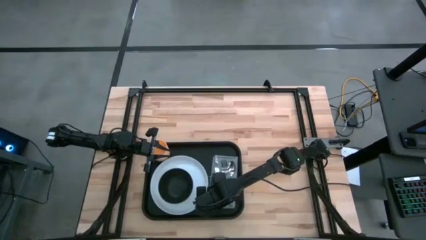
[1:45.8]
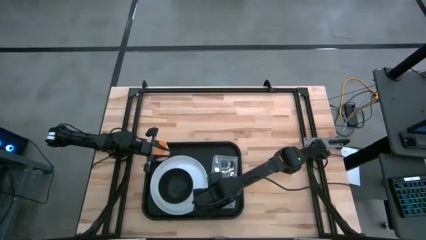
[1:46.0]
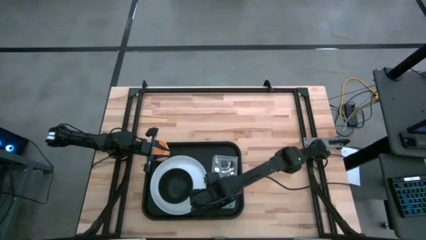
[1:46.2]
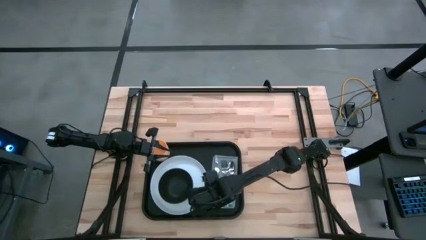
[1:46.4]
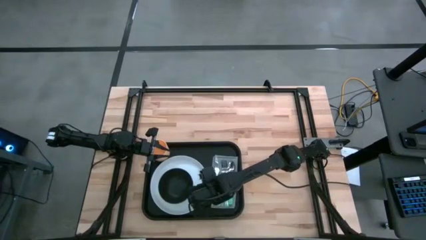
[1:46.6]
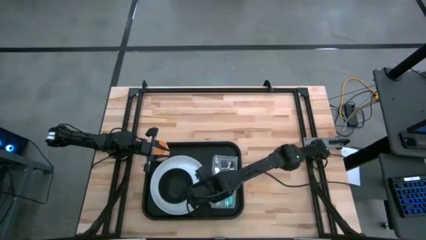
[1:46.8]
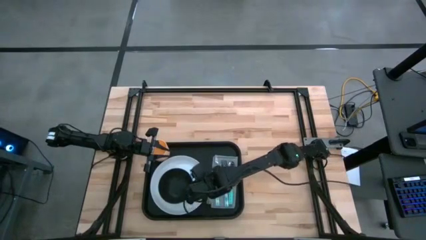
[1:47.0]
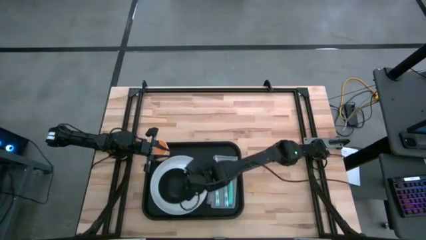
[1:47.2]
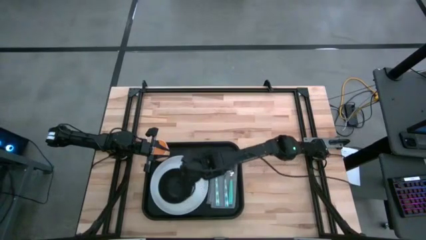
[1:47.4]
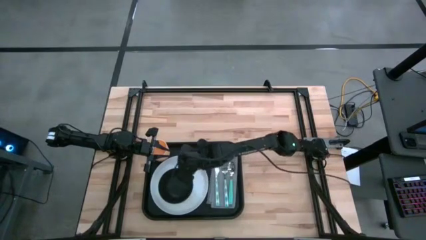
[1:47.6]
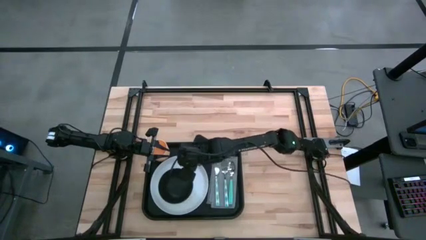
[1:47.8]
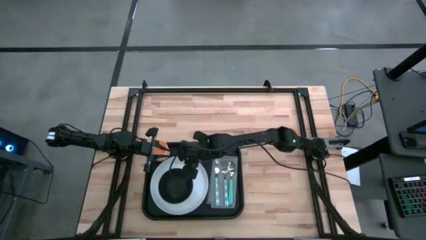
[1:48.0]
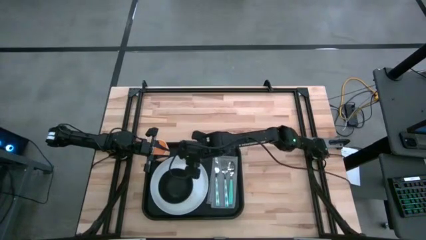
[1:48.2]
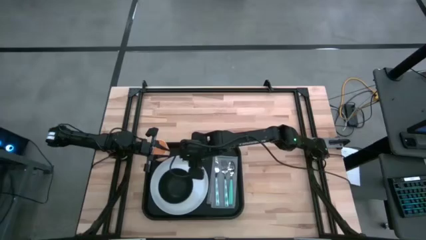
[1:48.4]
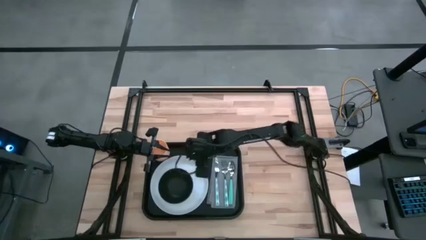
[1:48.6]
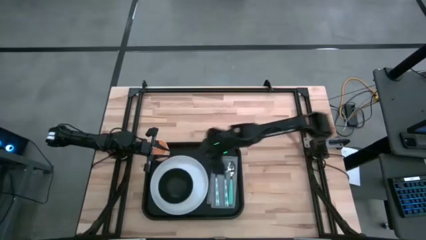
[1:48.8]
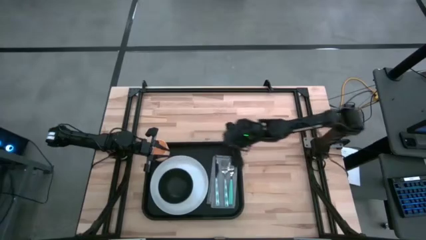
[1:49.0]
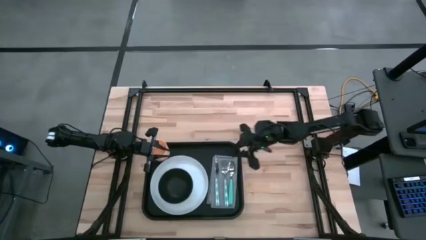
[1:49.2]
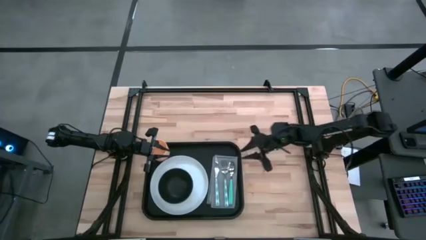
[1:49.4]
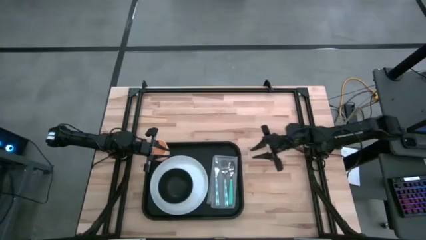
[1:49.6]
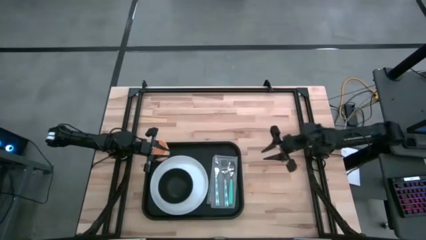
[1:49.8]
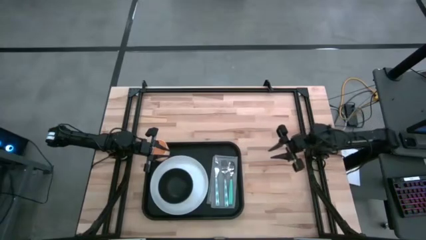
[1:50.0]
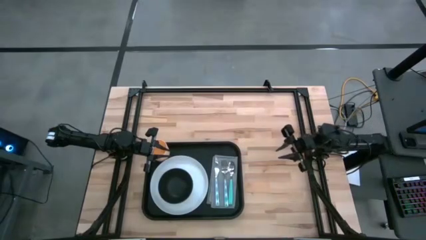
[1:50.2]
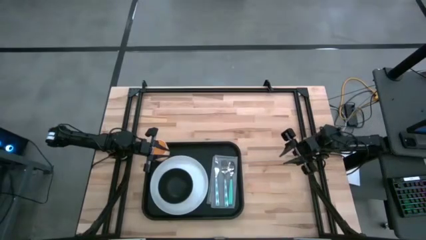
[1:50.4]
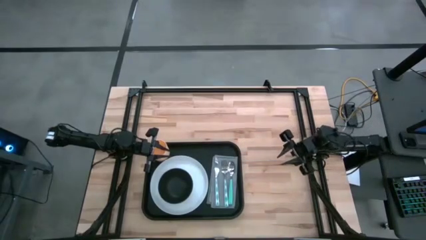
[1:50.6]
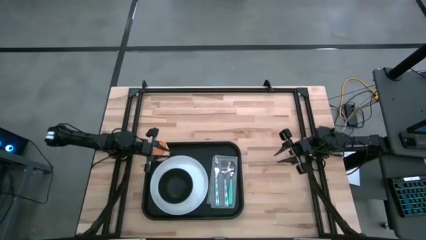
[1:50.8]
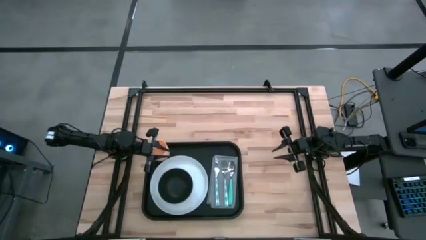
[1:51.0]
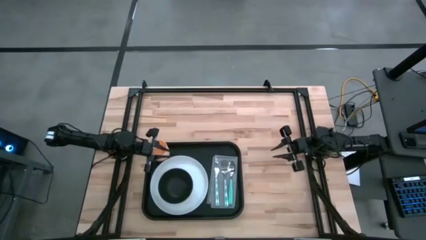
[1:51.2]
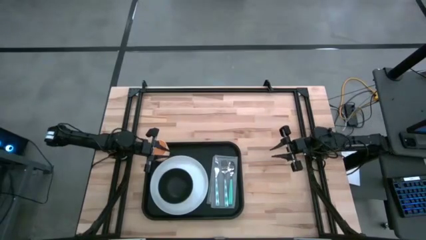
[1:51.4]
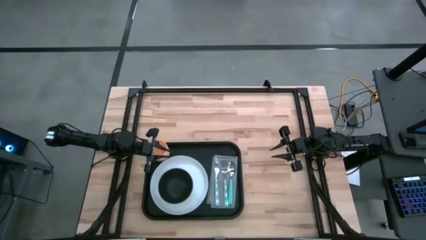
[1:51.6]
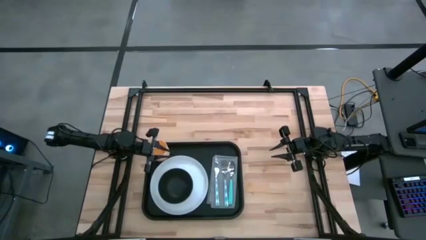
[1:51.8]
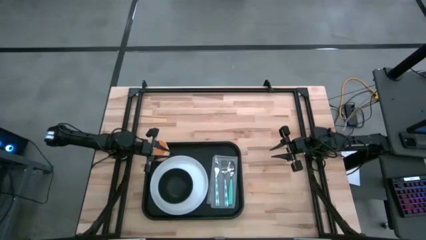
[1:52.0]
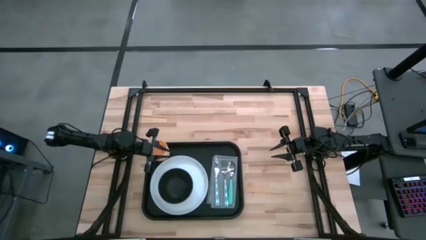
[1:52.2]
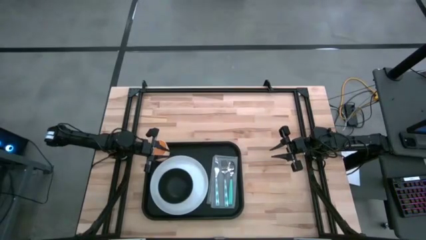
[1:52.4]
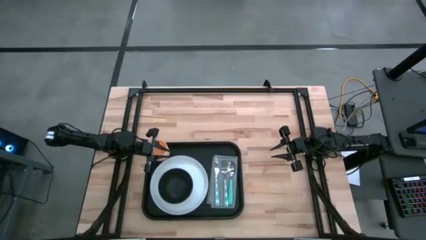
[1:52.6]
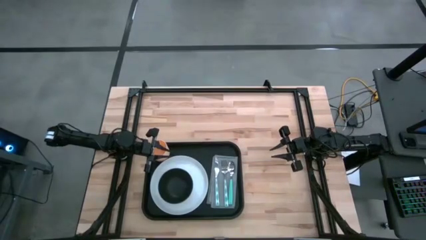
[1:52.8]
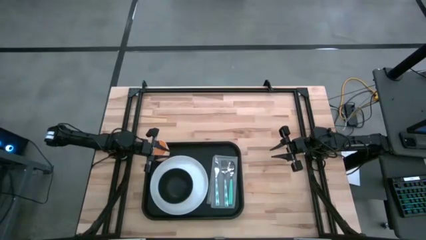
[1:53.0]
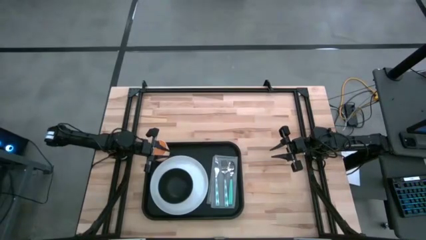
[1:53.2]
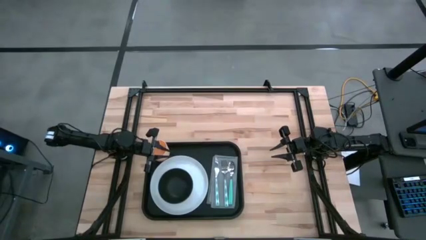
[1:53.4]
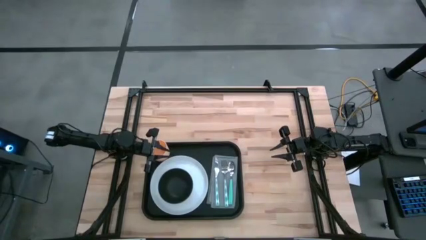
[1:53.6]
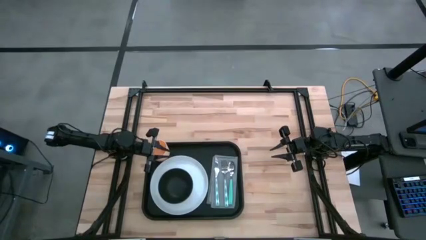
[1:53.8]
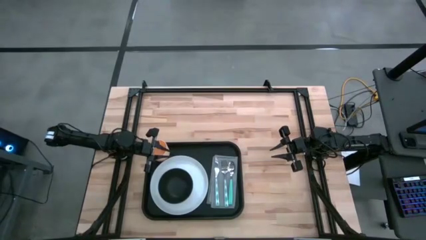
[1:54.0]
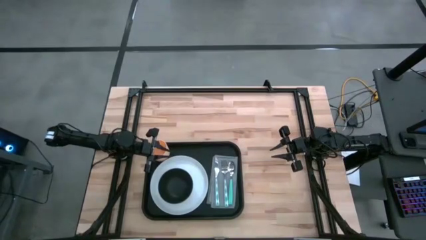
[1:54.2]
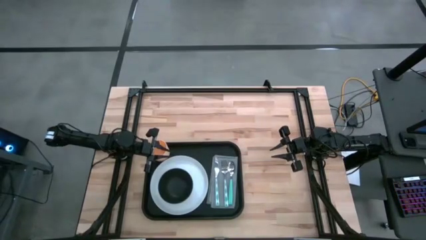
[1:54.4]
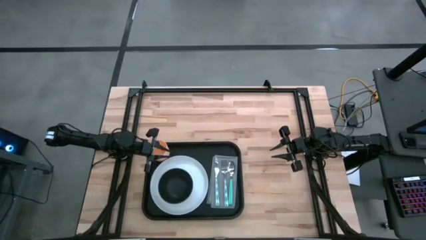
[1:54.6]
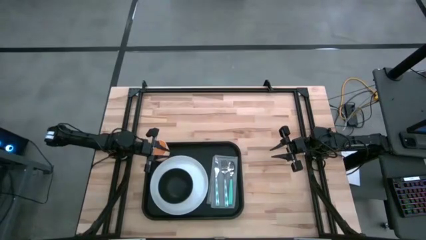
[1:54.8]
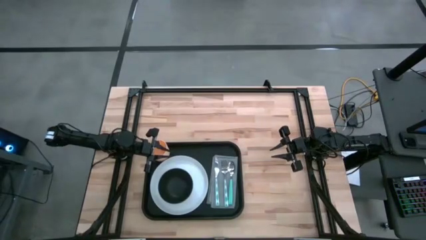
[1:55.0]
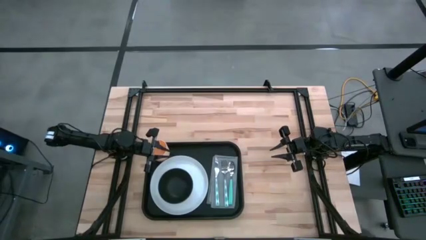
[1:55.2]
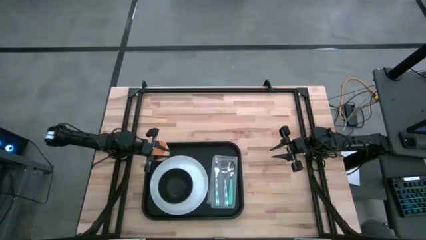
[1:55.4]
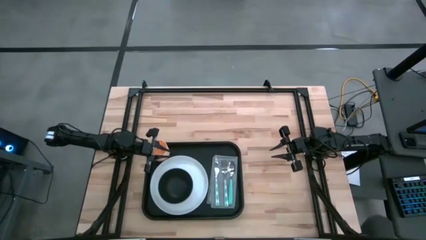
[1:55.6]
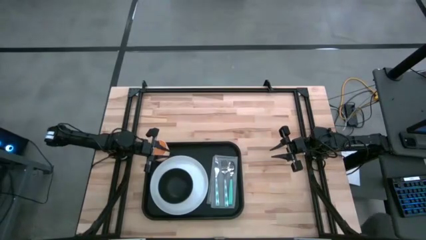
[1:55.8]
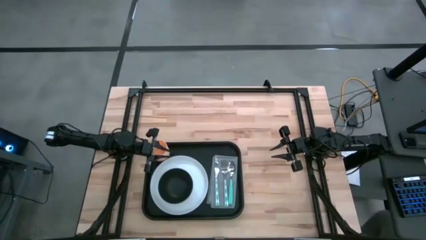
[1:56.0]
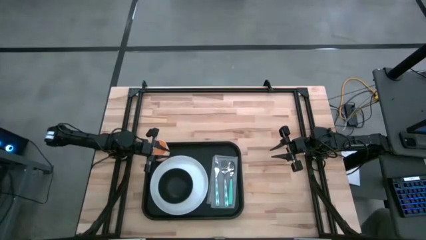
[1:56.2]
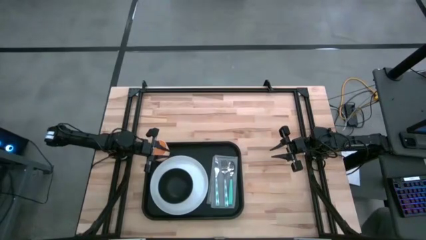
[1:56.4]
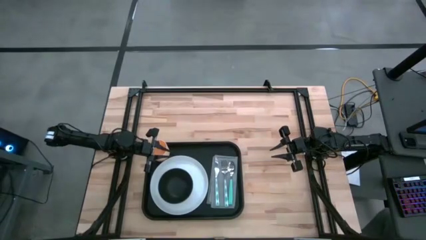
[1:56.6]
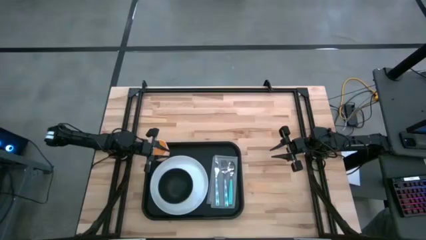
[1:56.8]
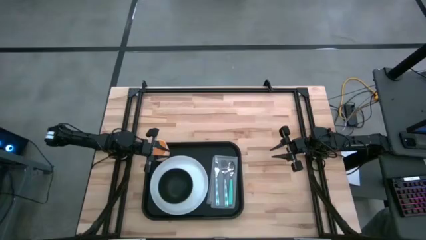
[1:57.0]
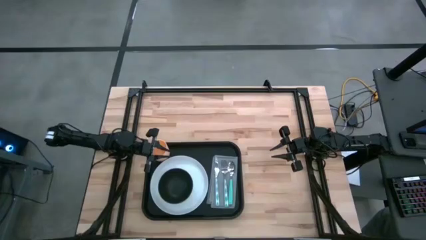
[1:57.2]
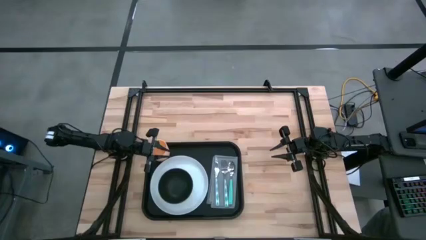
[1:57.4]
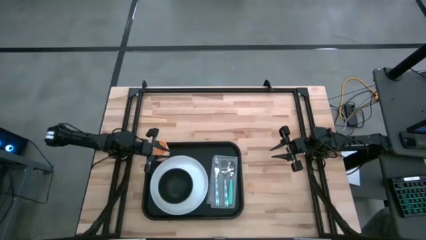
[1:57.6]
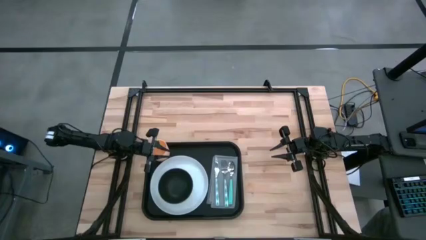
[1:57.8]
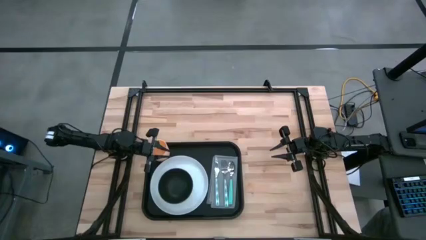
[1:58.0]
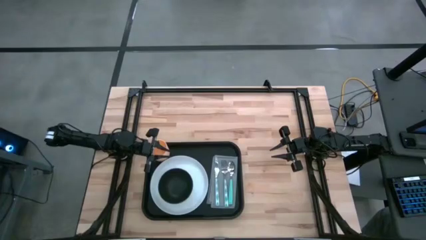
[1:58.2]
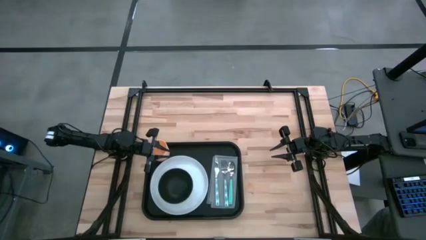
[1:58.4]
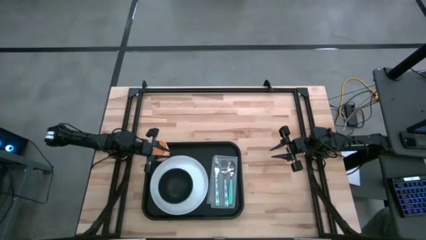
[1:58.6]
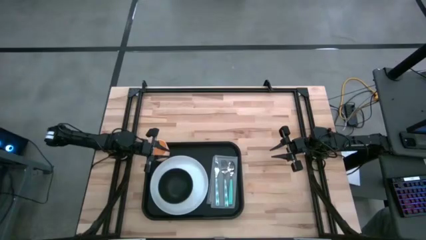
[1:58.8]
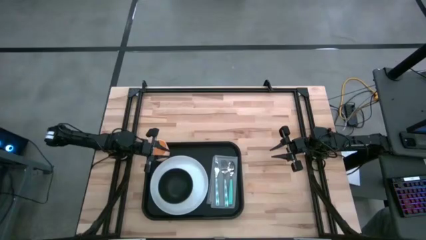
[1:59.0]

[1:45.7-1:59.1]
Task: Set up tray
Return to Home Position

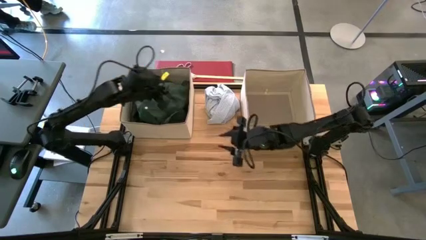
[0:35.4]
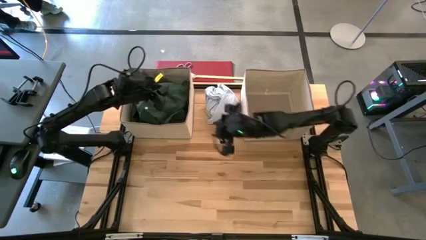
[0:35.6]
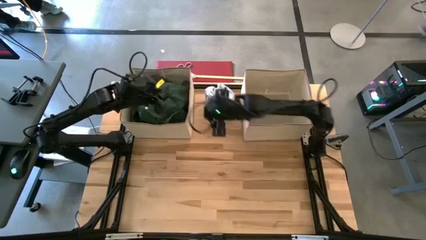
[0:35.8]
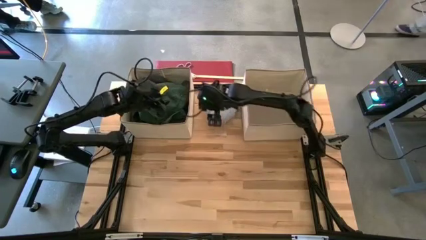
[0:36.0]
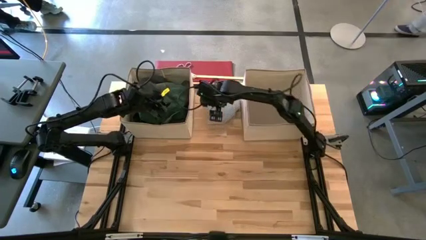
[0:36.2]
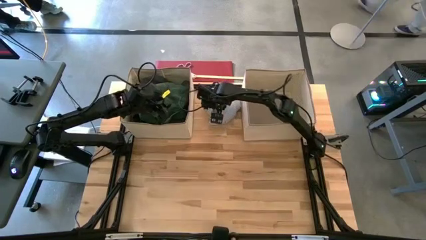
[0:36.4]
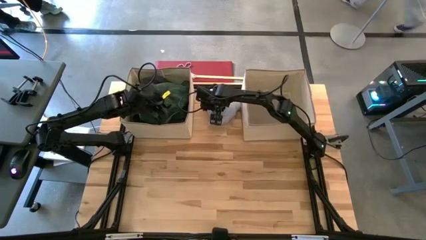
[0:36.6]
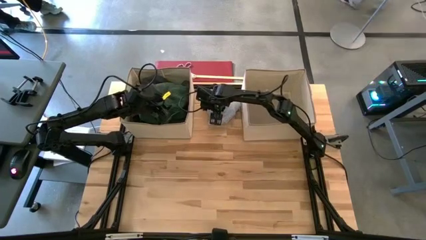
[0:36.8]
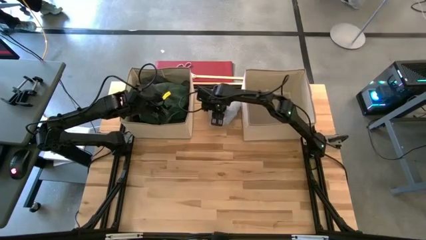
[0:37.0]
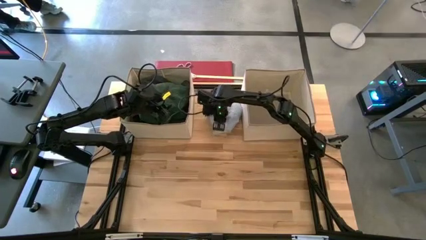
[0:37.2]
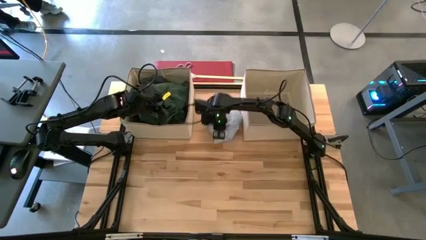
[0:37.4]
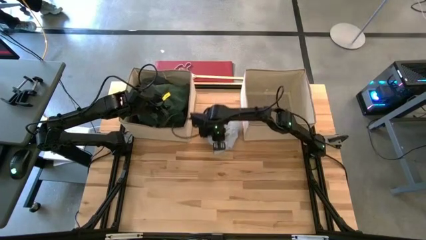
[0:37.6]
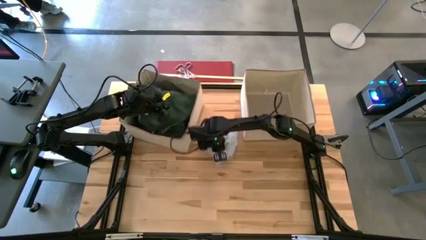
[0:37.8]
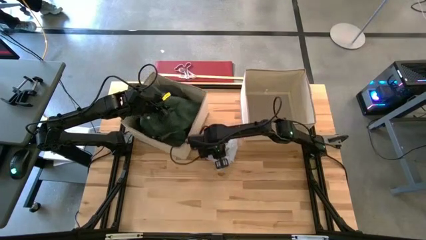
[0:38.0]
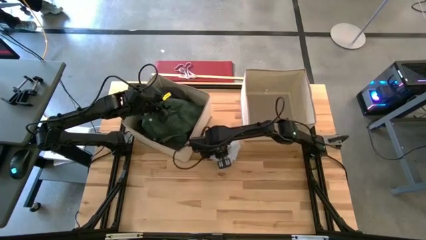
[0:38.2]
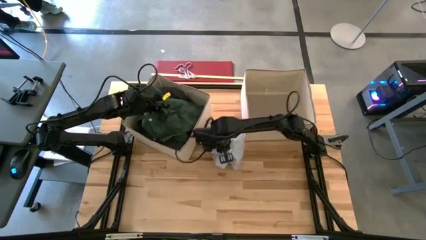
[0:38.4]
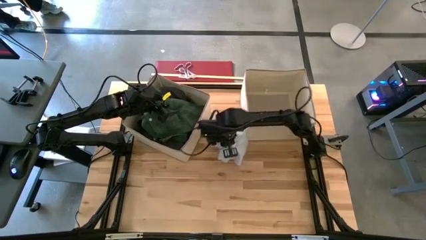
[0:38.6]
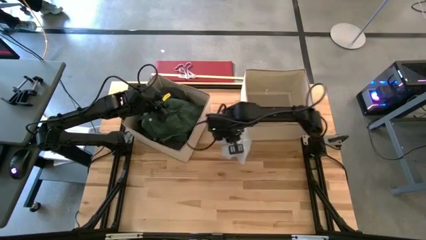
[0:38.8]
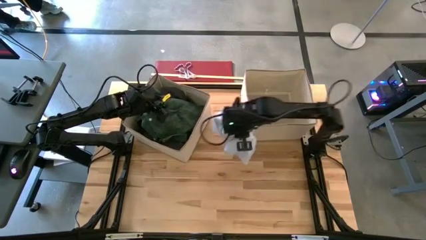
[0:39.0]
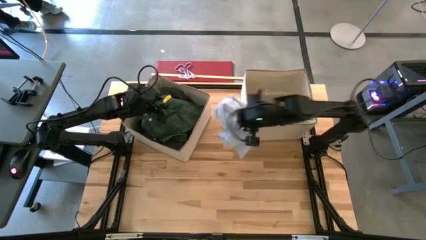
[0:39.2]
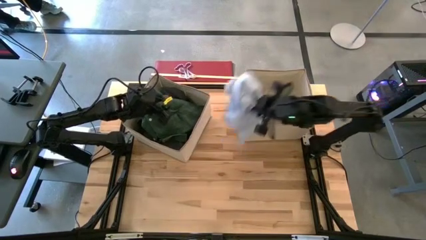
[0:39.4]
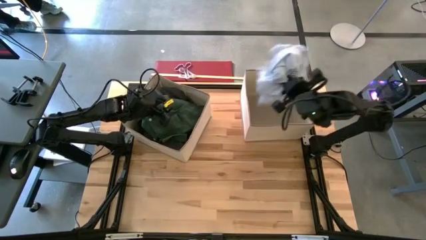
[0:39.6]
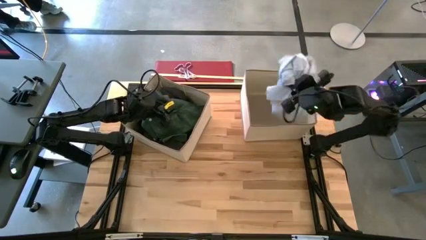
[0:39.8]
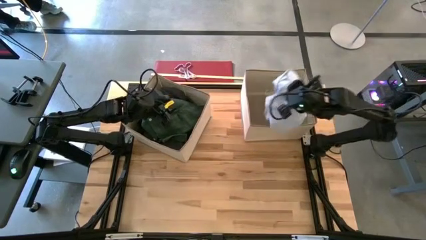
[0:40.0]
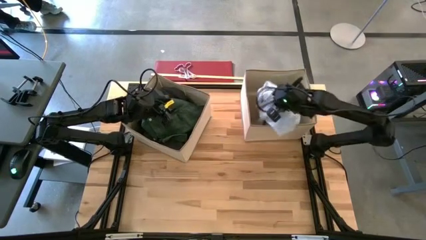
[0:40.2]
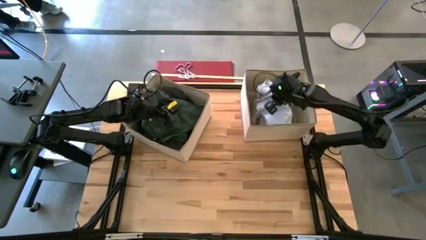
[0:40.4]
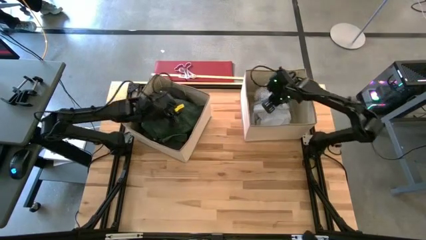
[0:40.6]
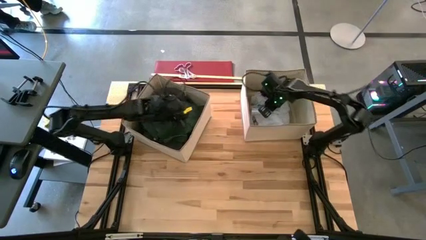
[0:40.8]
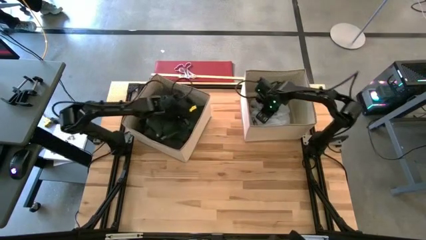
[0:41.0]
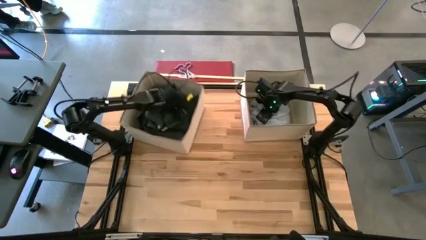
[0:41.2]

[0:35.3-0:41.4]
Task: Sort clothes
Put the white pants into the right laundry organizer
